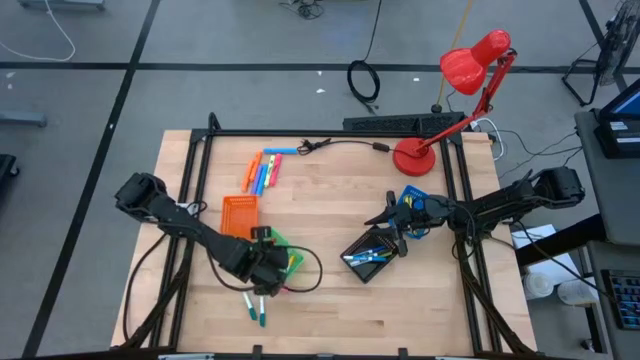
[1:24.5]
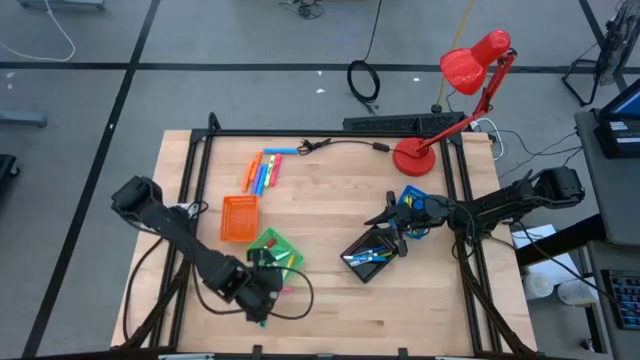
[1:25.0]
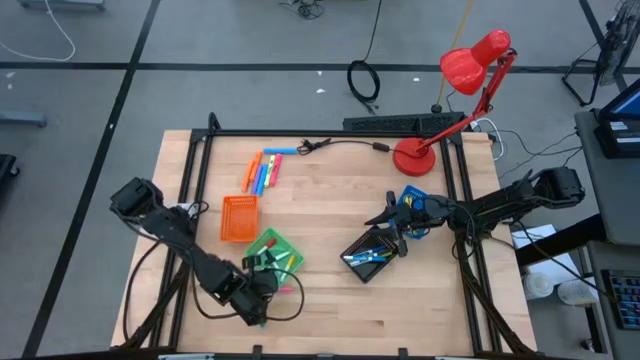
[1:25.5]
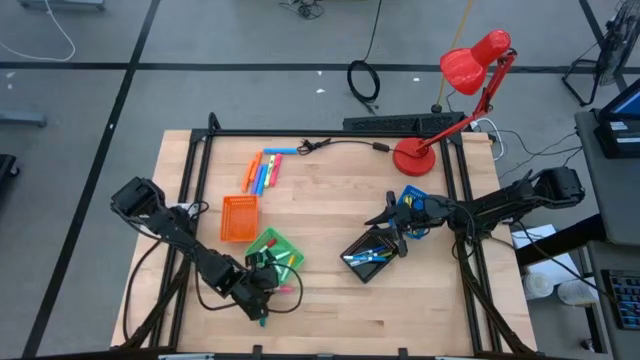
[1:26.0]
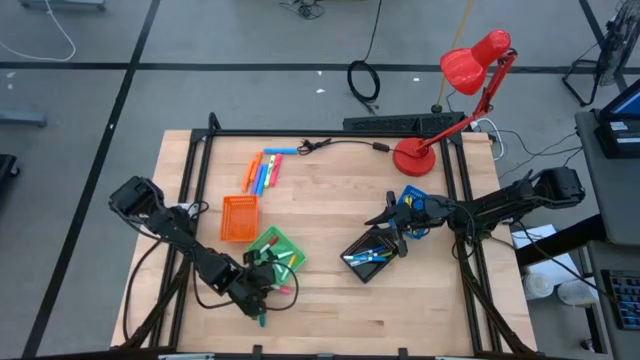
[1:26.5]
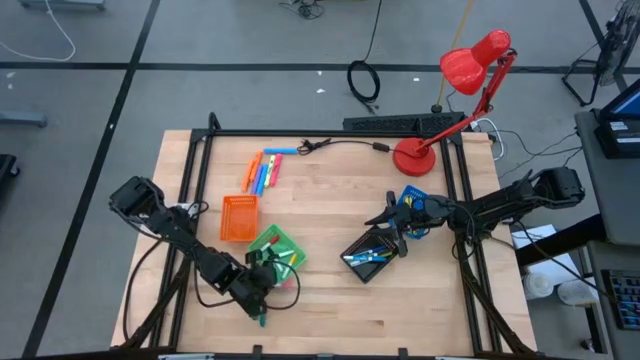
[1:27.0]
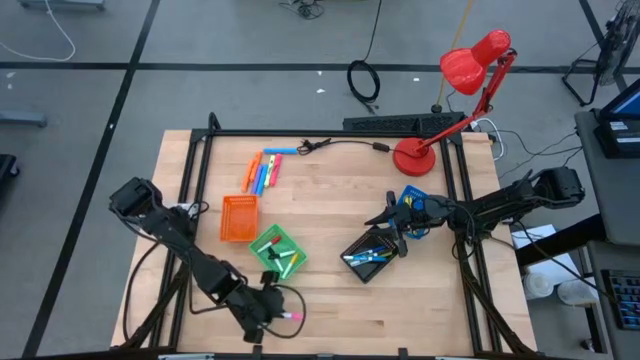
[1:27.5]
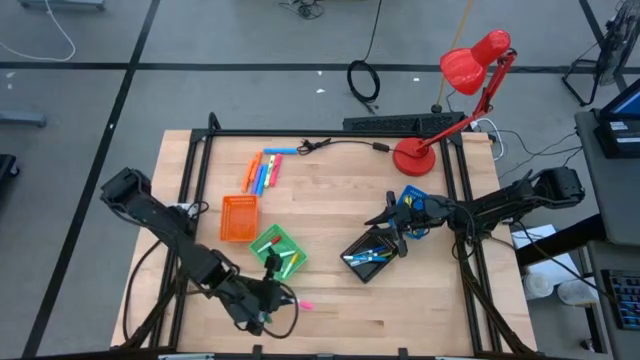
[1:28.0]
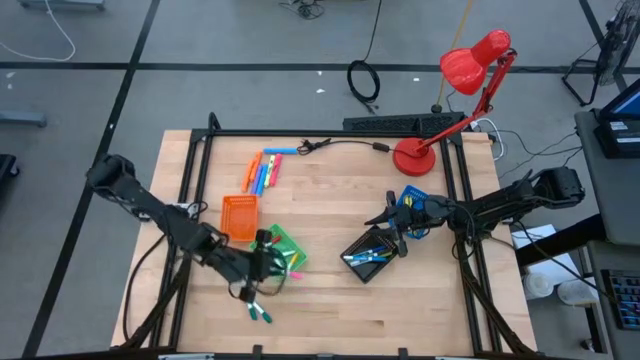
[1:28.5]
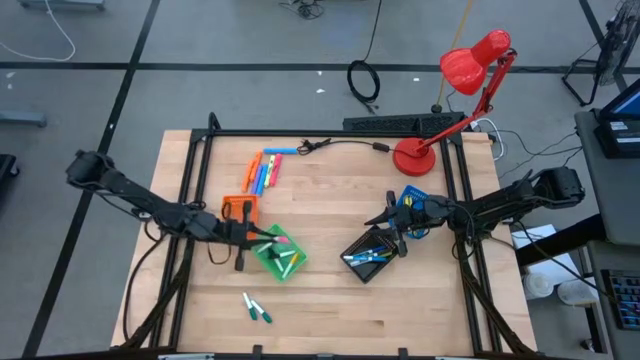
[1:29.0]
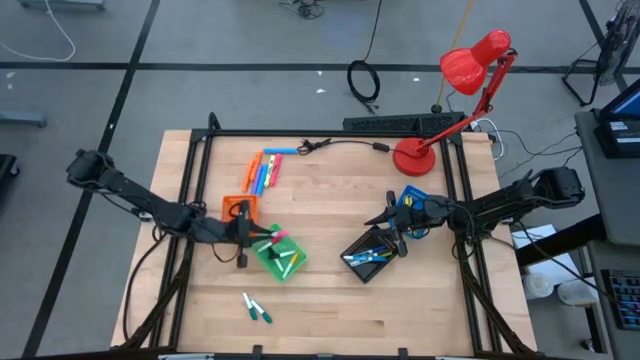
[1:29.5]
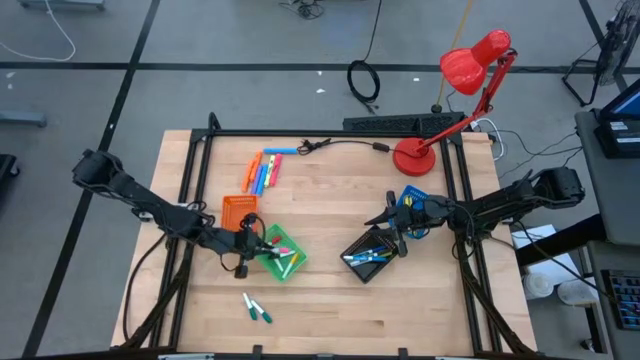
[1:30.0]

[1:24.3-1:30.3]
Task: Pick & Place Markers
Put the small pink highlighter pen into the green basket

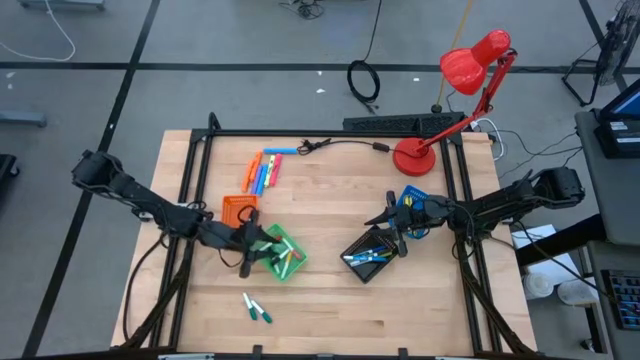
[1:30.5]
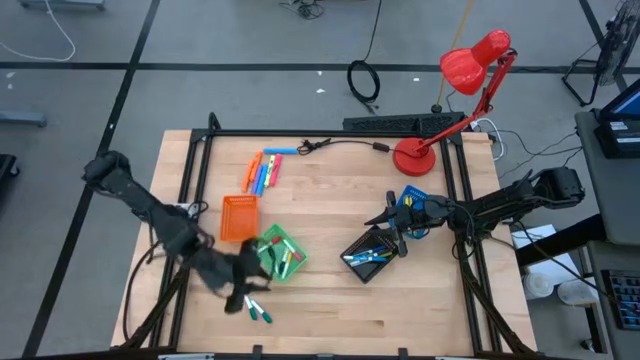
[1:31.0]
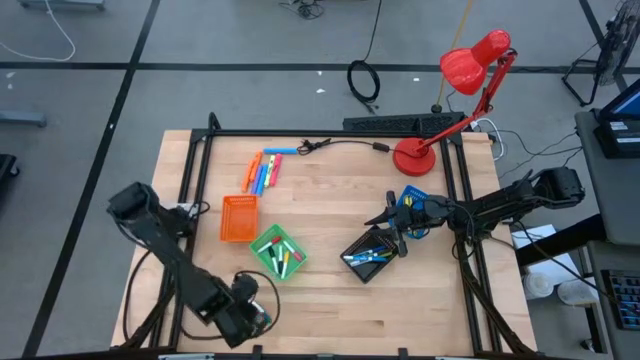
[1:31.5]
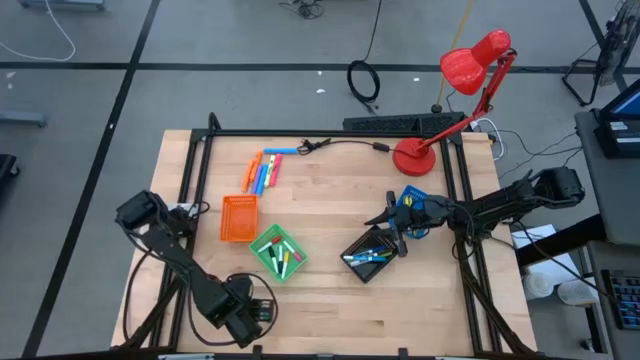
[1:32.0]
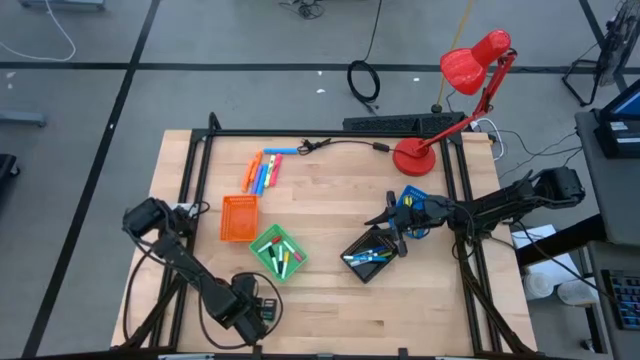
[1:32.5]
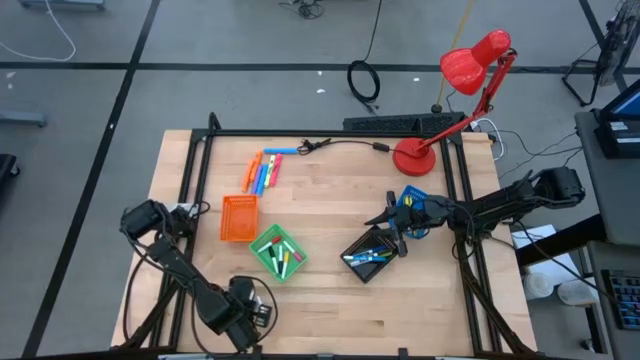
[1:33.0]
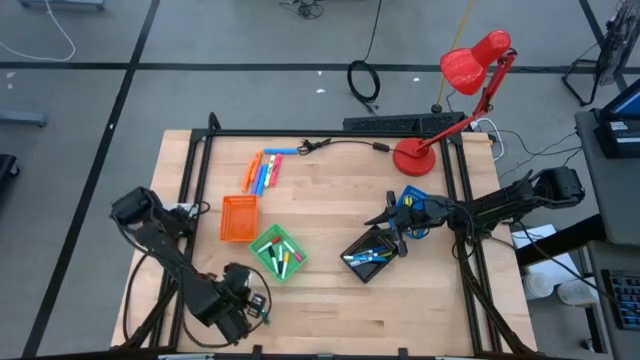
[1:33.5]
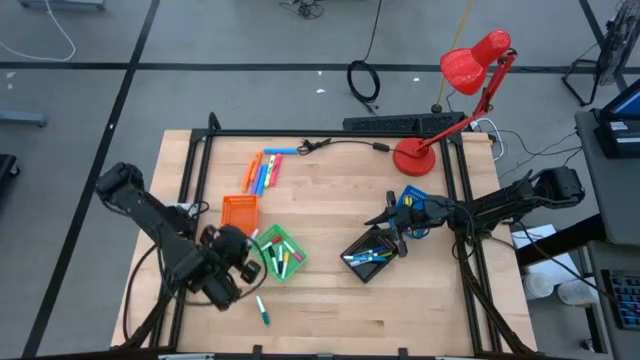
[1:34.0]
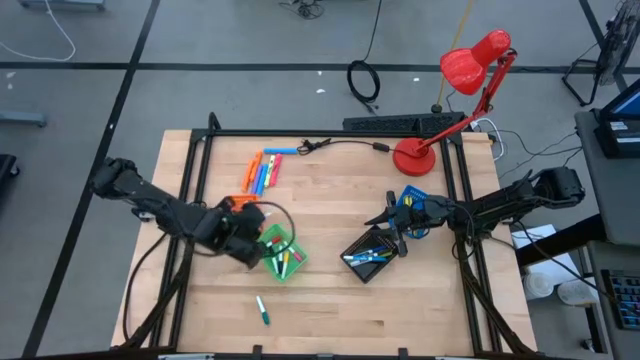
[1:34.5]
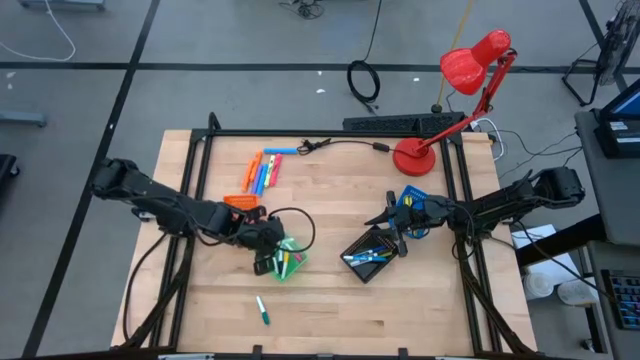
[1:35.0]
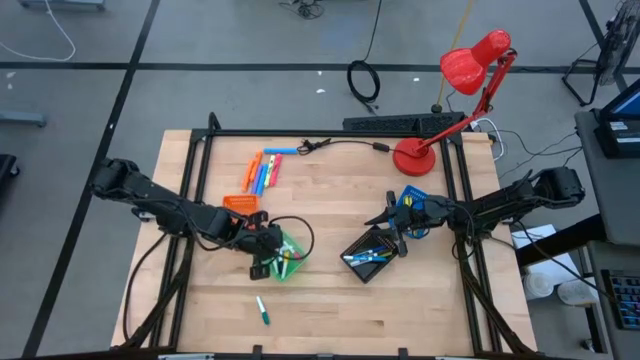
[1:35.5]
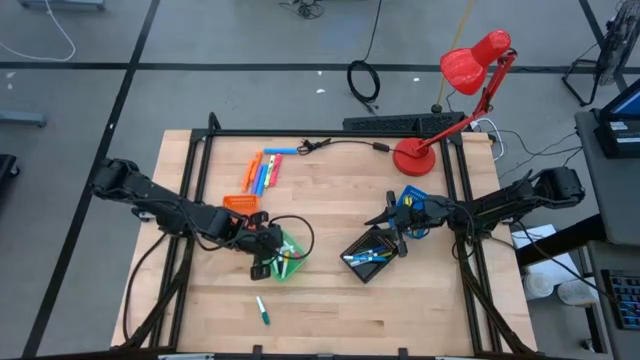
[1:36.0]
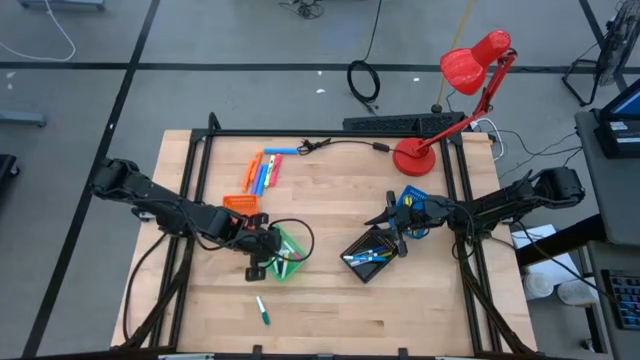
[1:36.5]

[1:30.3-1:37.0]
Put the left small blue highlighter pen into the green basket

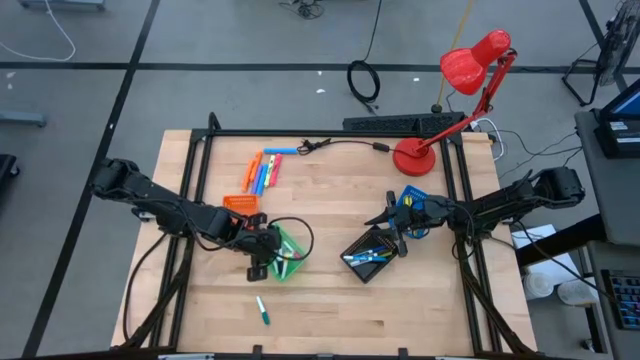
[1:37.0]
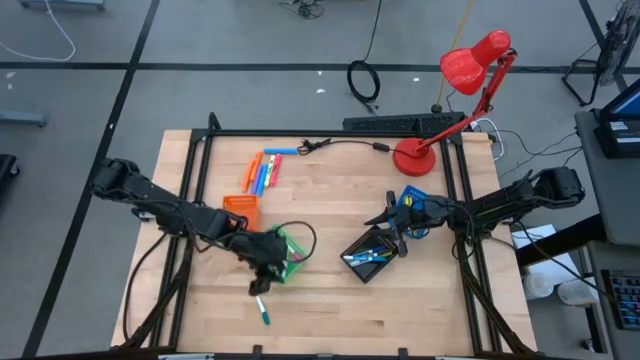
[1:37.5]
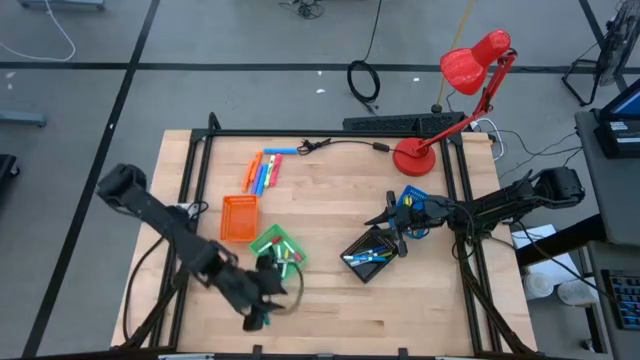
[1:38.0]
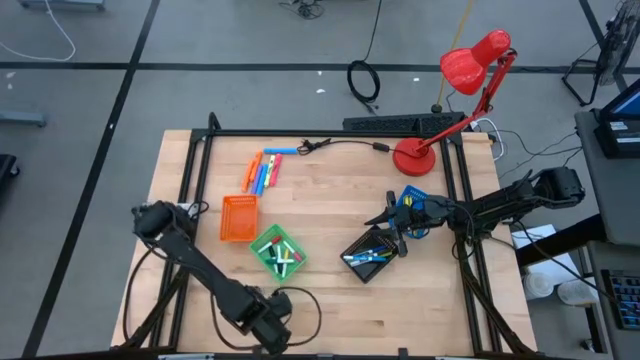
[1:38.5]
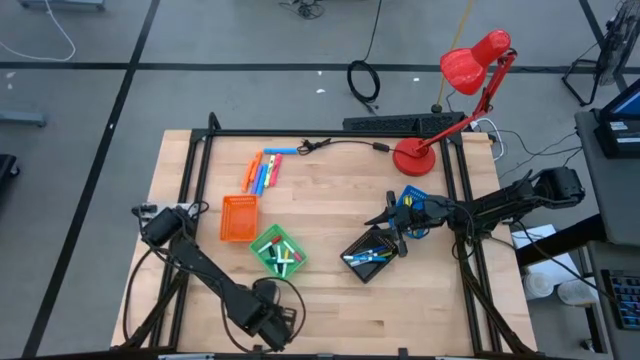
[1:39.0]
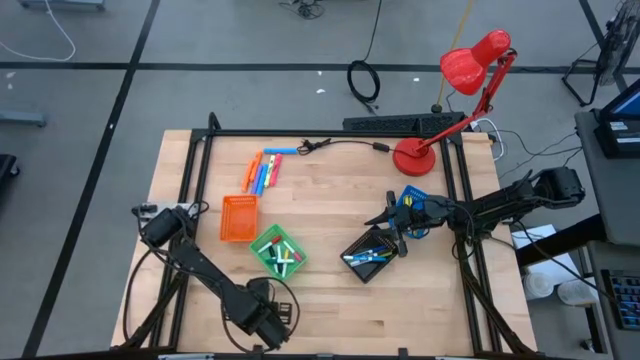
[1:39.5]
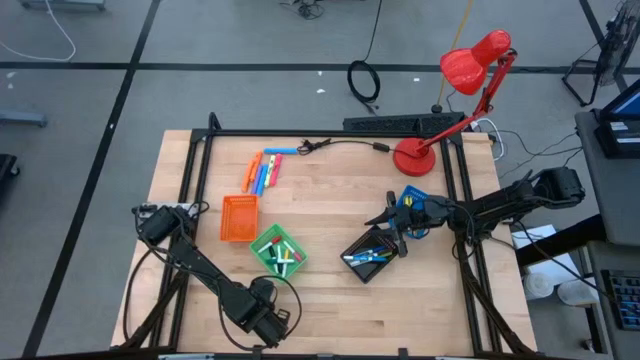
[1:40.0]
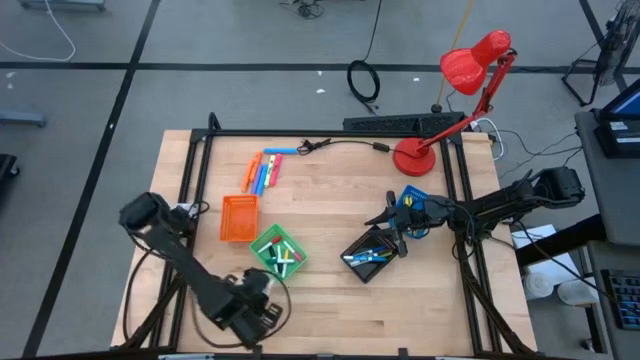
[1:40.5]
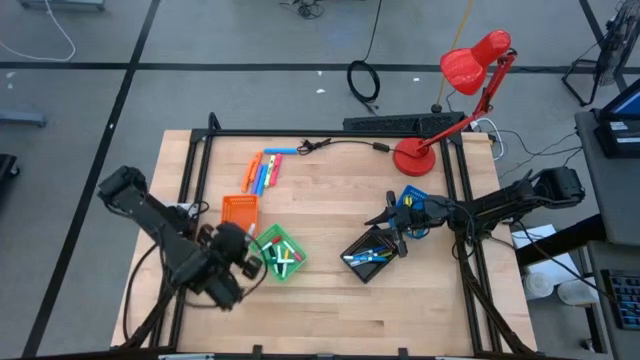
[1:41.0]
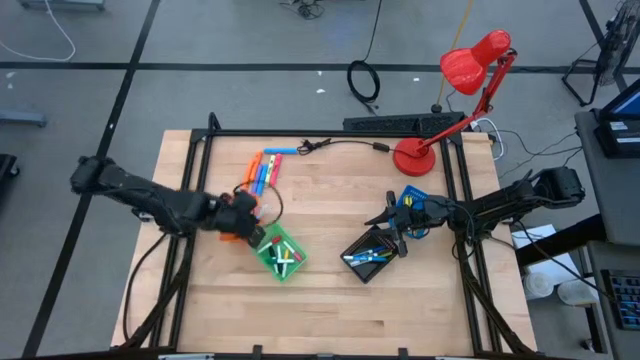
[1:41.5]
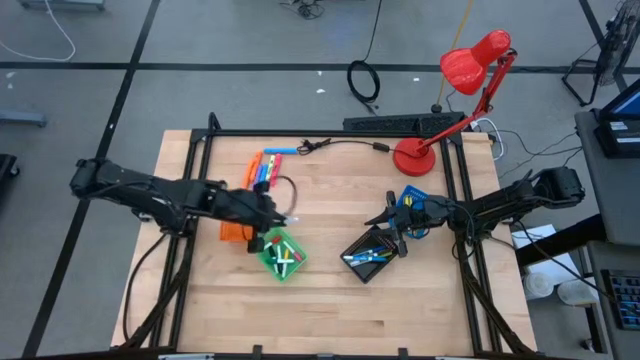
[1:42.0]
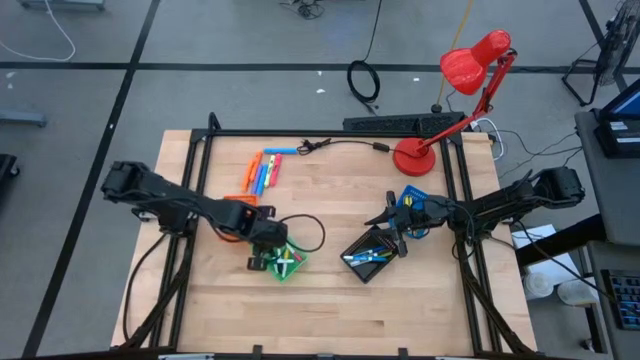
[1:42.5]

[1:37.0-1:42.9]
Put the small blue highlighter pen into the green basket

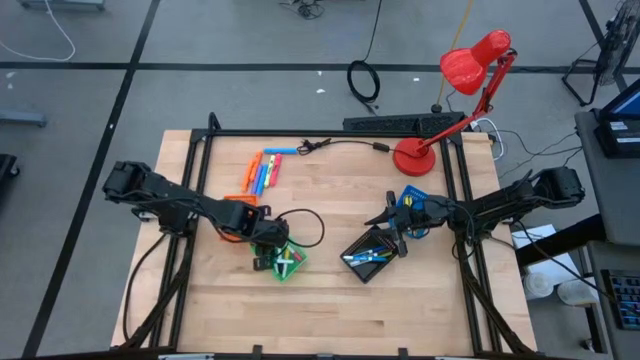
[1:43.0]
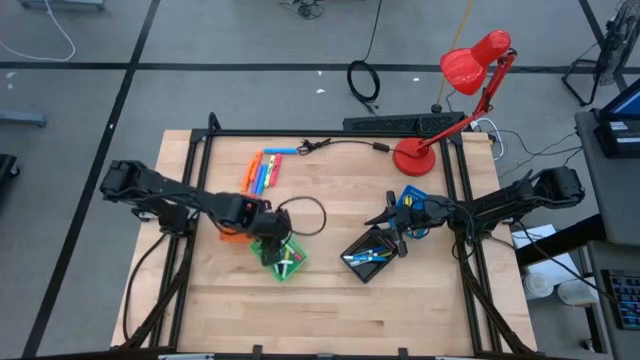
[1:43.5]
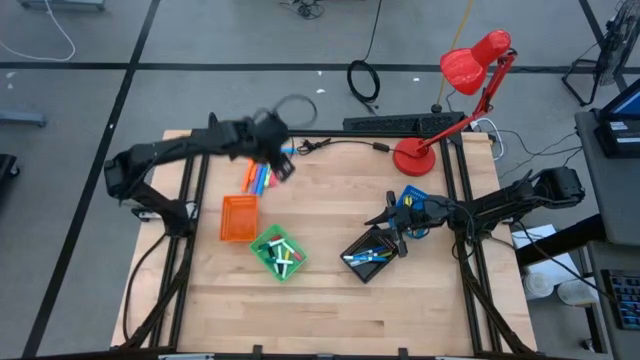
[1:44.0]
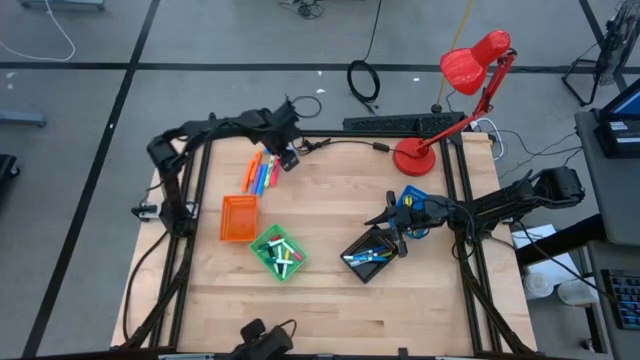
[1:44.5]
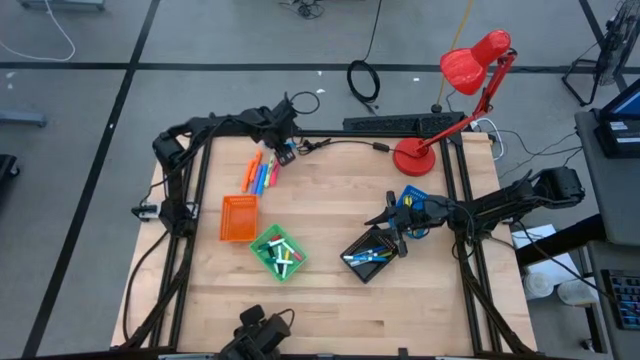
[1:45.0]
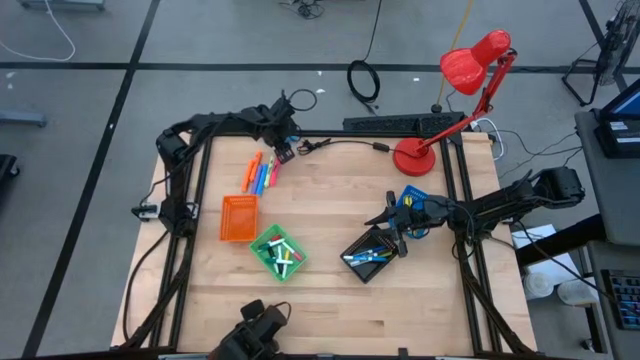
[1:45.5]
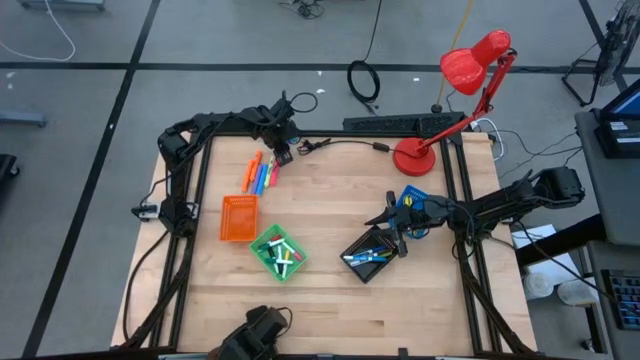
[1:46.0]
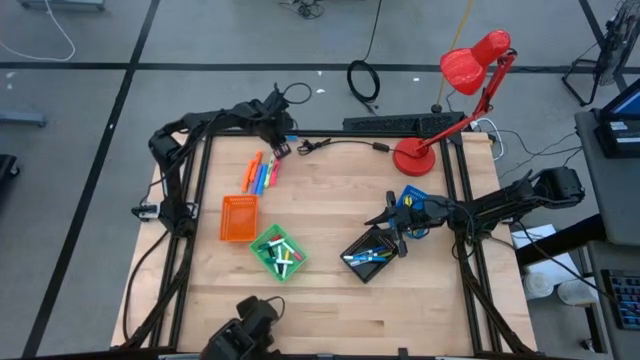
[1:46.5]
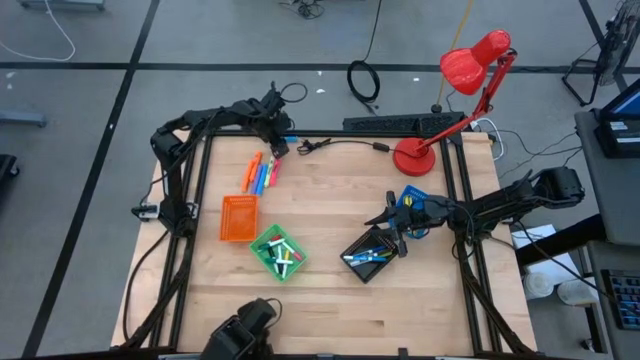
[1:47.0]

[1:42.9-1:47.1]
Put the large top blue highlighter pen into the orange basket
